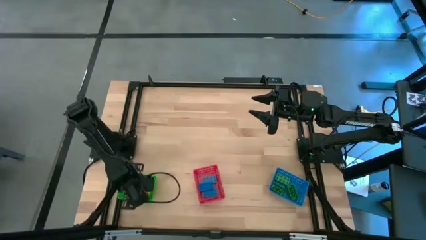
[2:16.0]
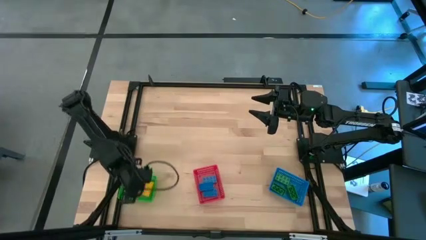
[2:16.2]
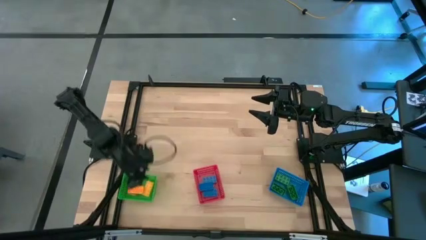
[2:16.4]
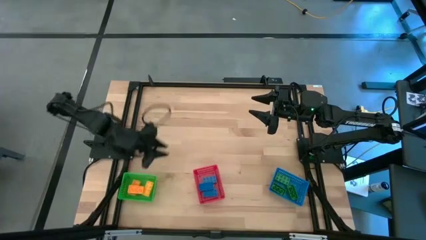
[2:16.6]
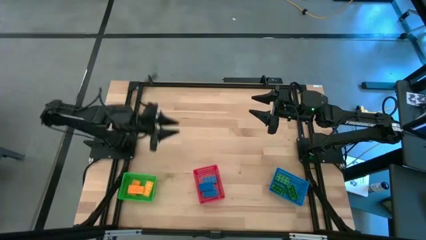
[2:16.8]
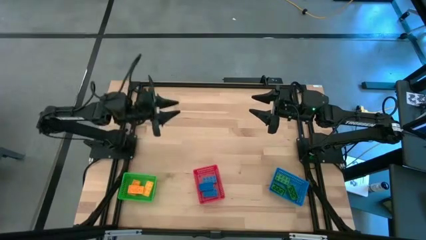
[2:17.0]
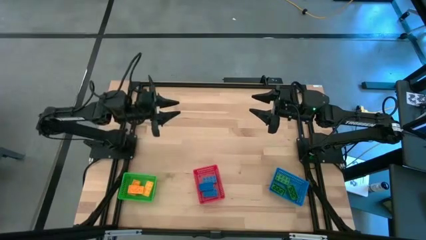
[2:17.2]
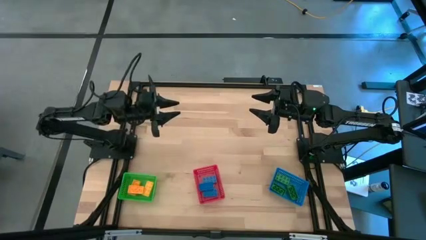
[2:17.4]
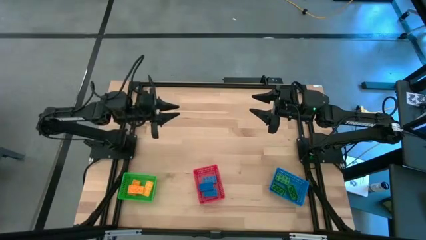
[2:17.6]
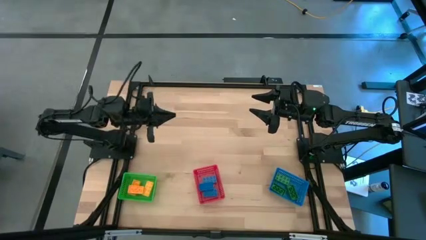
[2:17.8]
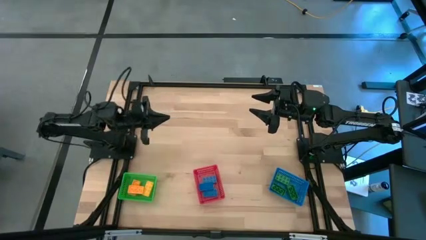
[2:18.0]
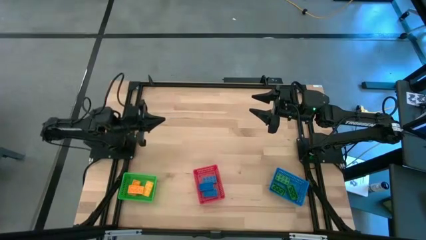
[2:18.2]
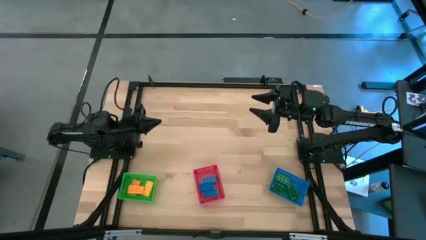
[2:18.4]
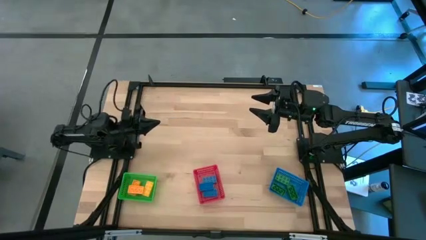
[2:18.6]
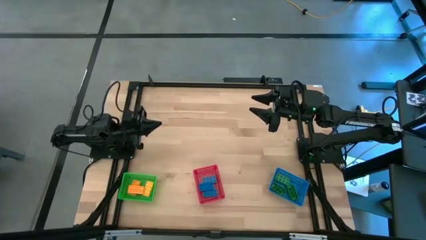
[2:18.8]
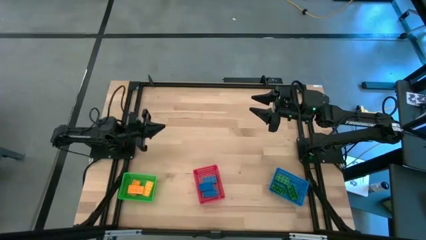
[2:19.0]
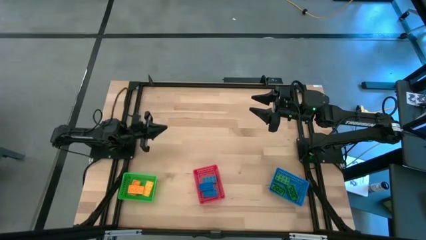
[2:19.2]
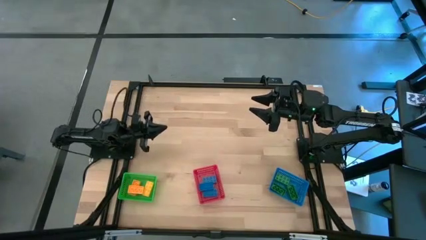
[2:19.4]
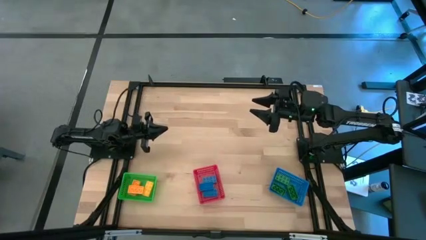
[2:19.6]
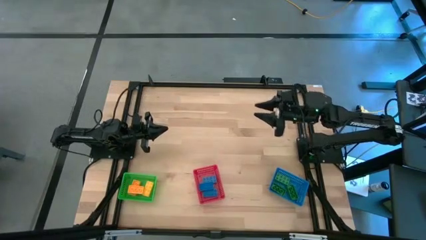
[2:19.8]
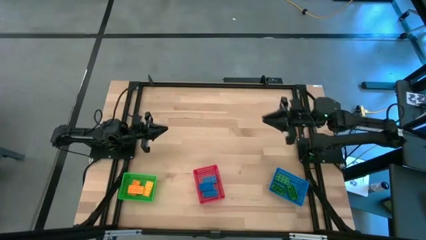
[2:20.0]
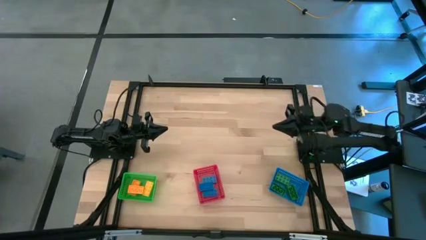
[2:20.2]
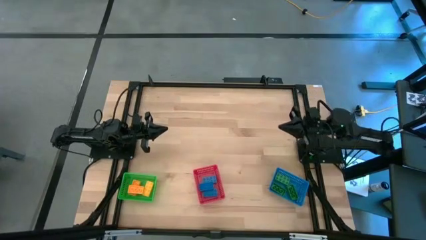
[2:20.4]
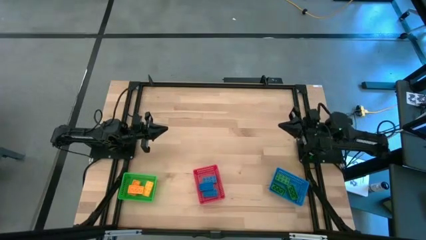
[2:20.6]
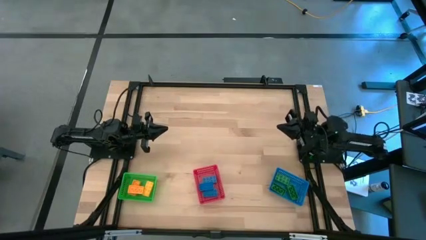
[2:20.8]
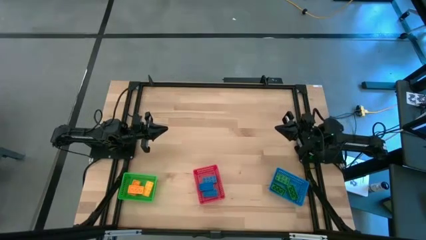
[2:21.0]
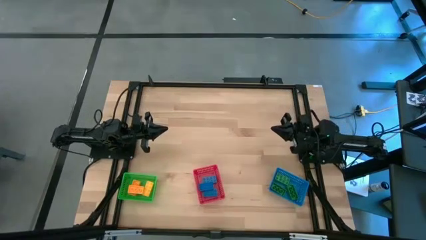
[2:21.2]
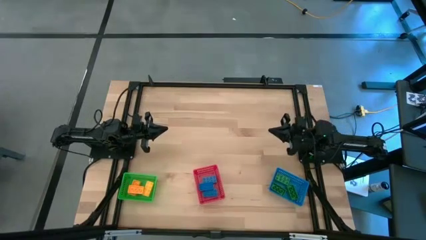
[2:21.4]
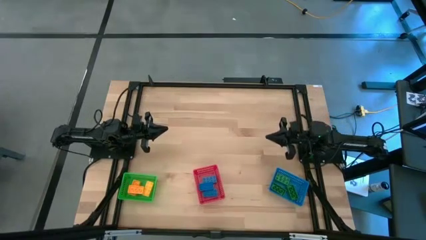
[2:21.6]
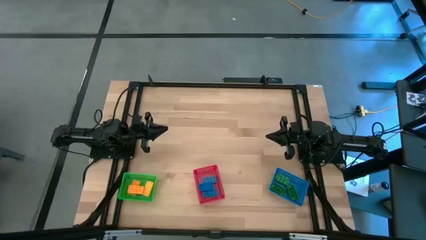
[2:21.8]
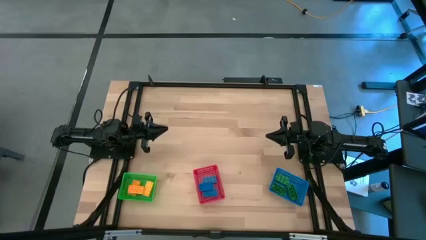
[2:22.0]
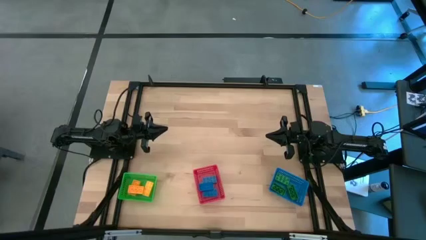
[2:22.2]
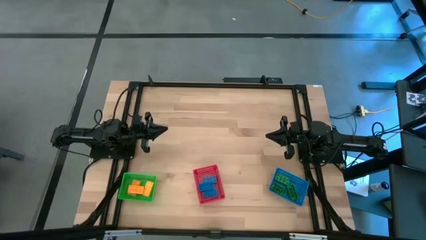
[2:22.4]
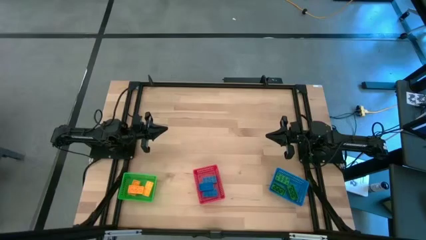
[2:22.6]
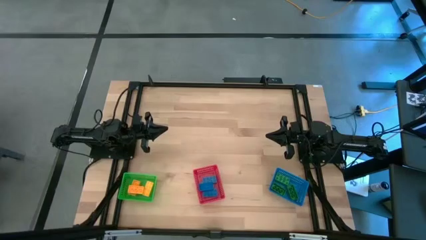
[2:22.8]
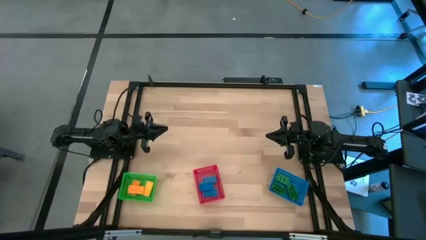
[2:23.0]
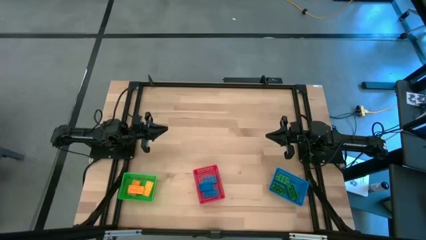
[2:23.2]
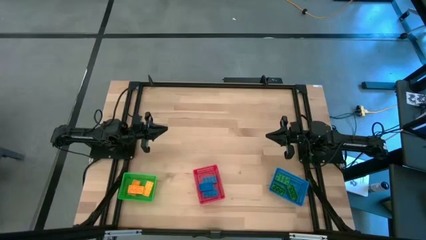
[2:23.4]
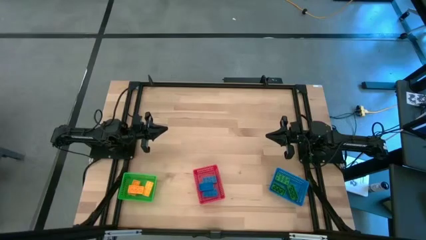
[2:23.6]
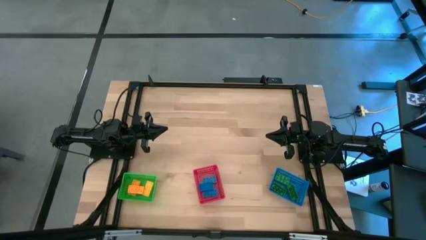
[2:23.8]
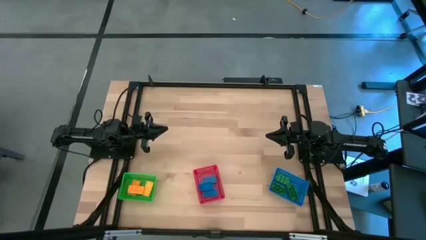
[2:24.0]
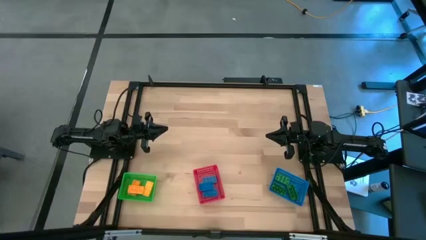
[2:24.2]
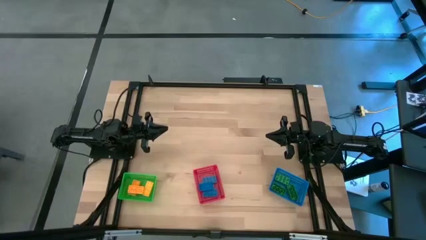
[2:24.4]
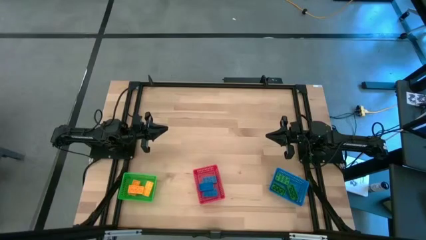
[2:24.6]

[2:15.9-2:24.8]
Task: Sort & place blocks by color
Return to Home Position

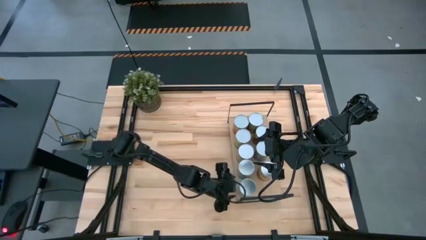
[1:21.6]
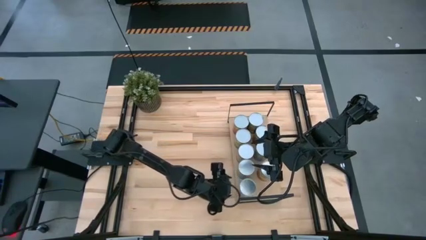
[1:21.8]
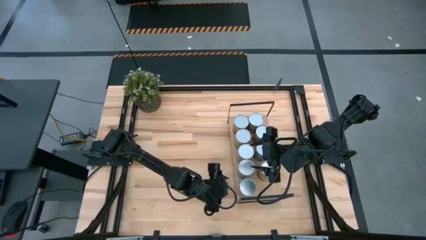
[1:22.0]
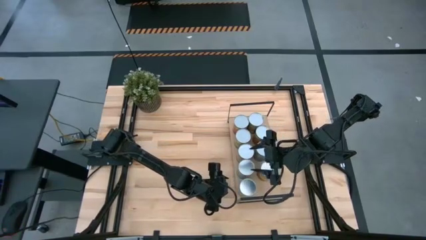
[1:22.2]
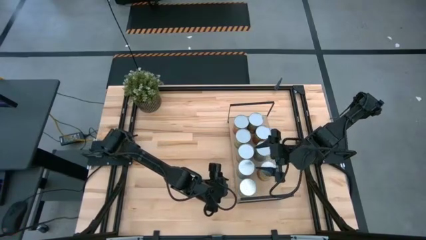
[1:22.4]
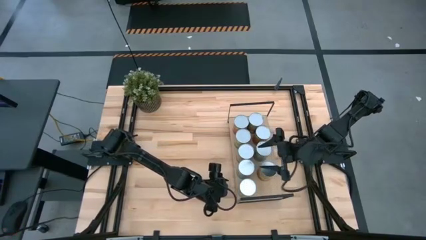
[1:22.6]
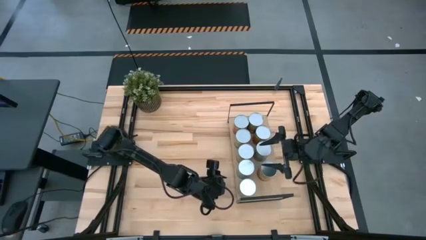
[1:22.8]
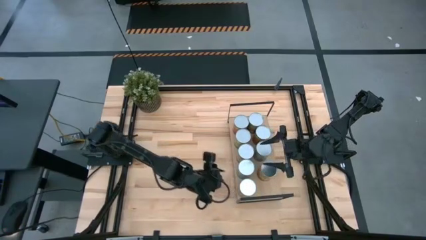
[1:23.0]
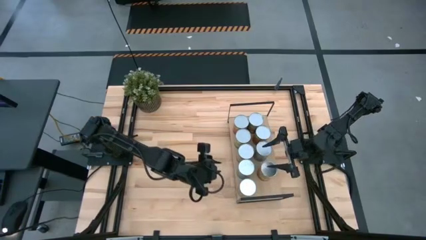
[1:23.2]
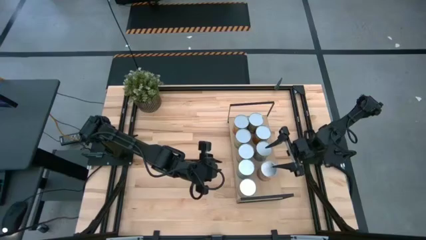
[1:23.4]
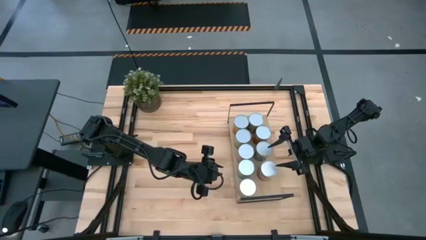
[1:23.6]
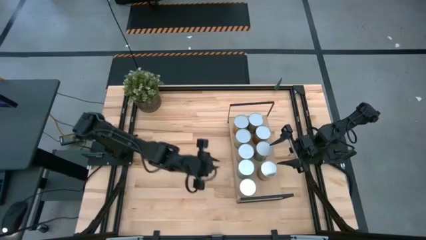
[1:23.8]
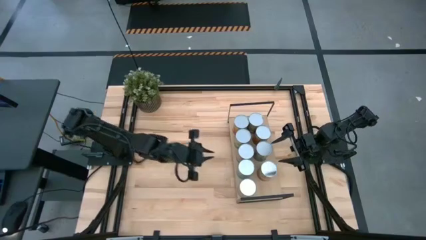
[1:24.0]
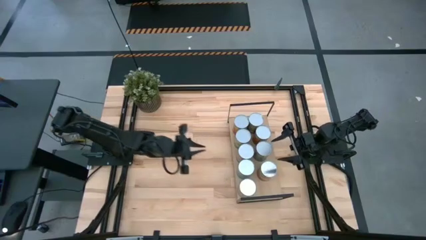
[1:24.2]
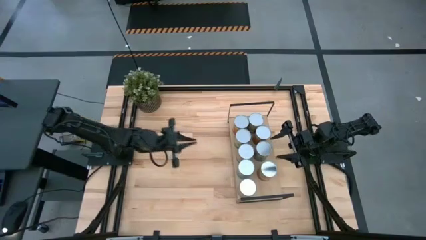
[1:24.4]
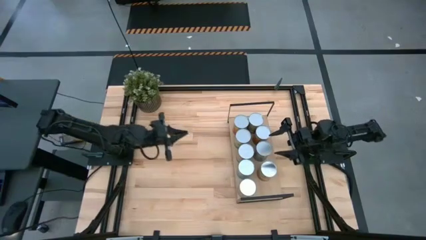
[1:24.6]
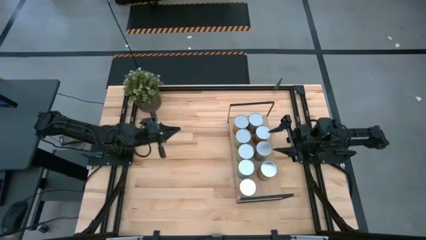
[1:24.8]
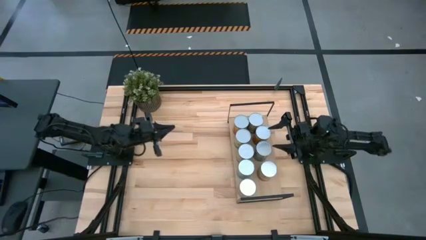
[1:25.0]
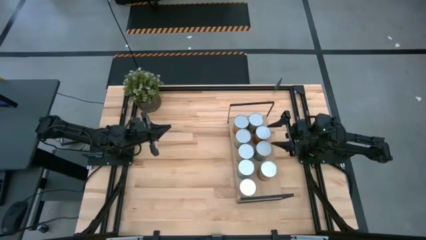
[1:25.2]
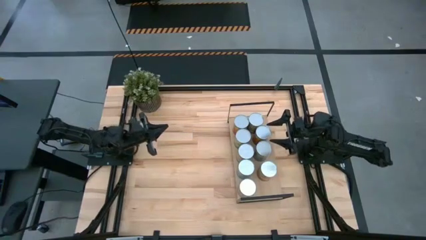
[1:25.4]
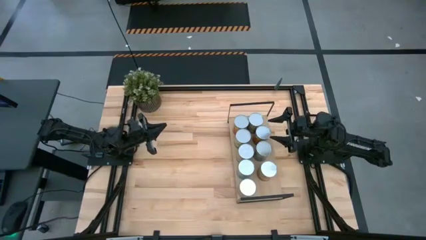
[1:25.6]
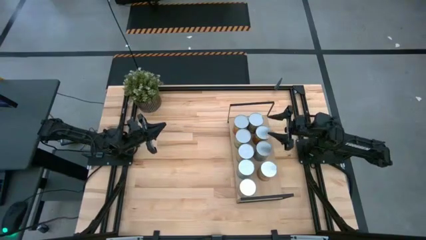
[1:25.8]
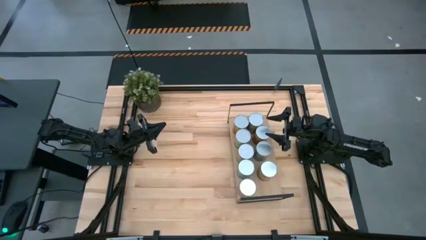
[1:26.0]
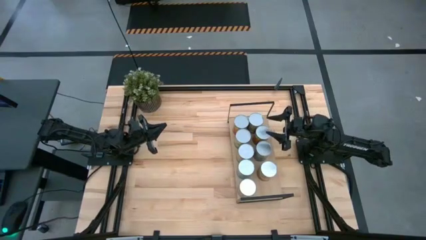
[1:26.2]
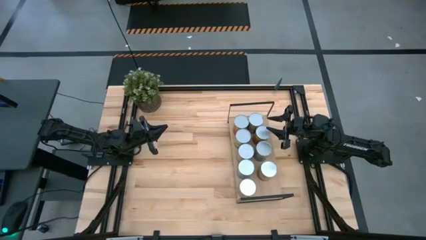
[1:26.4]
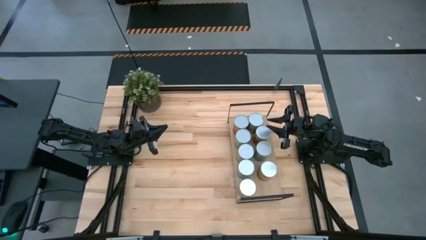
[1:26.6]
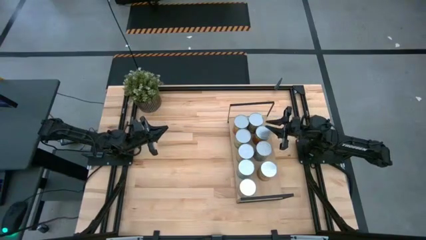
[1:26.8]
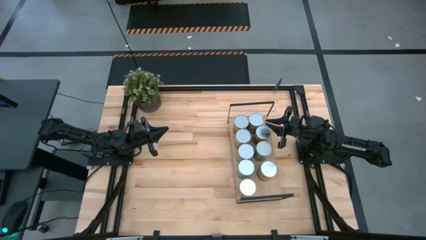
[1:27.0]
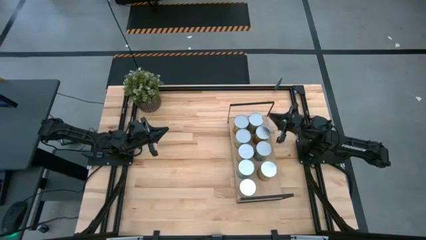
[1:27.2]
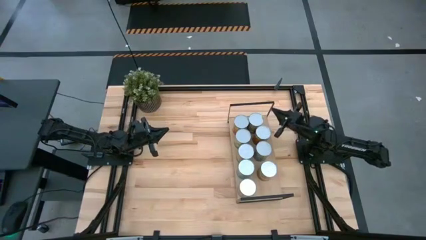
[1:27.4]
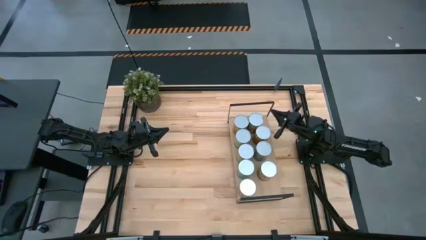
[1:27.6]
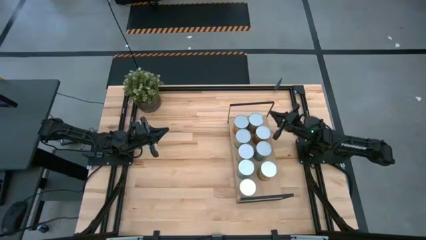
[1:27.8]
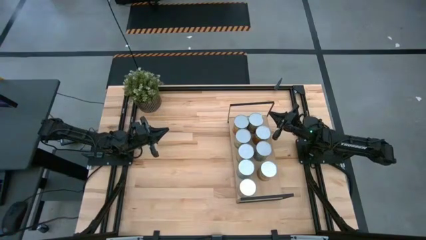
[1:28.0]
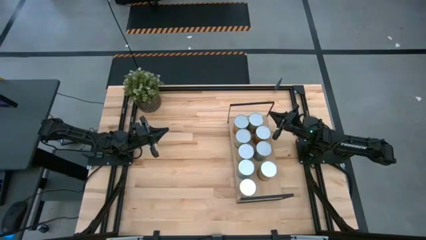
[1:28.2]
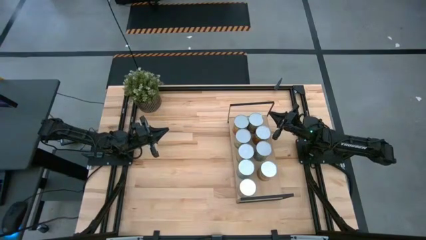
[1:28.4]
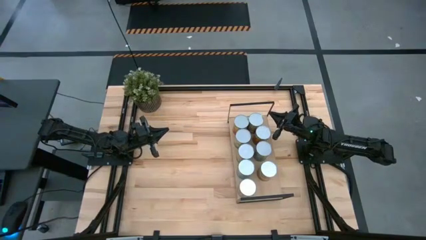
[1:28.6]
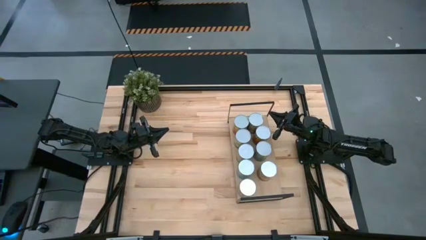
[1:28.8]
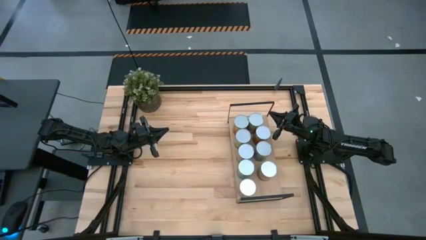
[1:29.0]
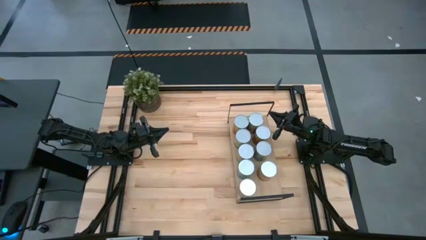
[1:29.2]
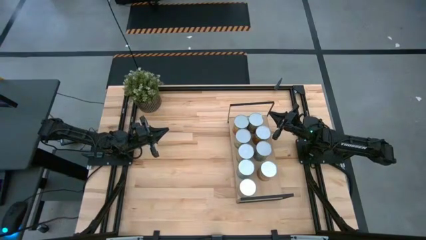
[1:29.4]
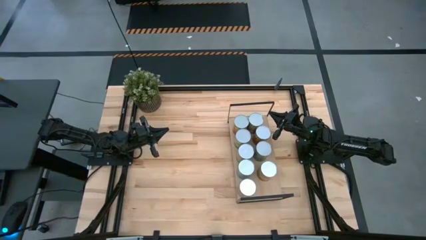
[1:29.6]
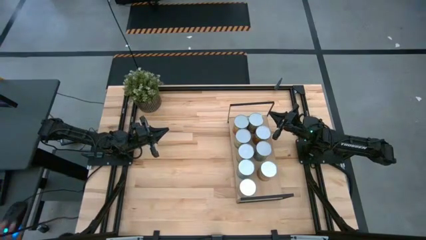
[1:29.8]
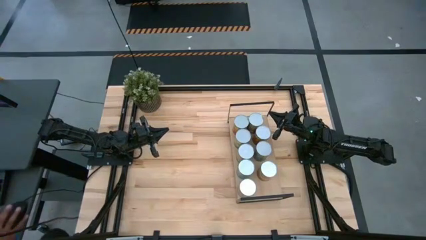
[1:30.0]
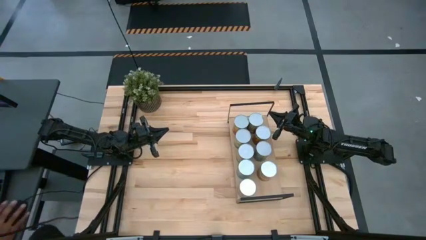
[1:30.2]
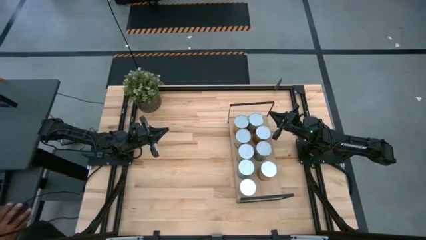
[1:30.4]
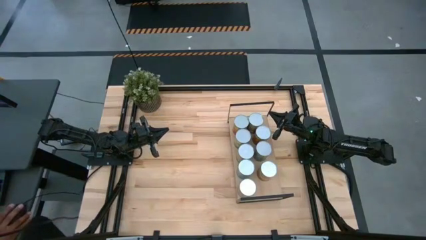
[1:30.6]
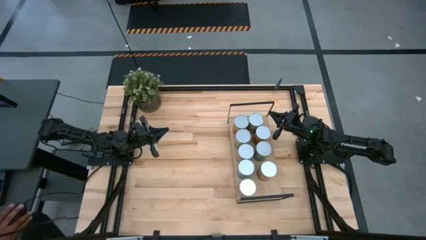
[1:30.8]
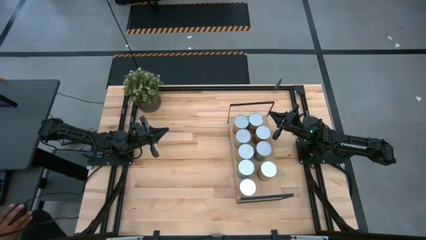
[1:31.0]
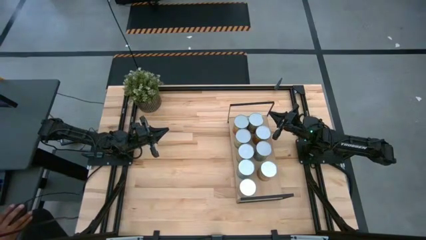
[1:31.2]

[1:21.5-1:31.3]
Task: Pick and place cans onto a shelf
Return to Home Position
